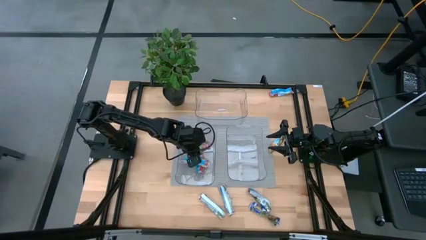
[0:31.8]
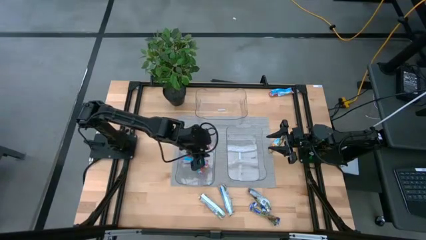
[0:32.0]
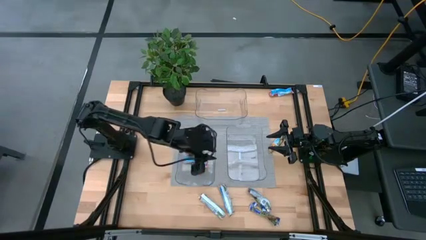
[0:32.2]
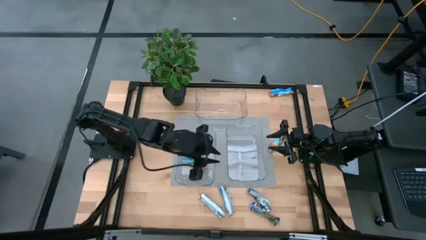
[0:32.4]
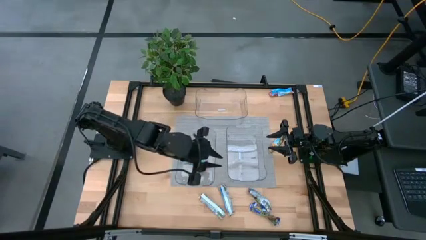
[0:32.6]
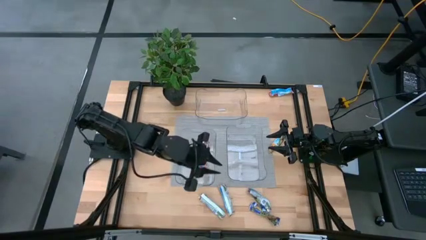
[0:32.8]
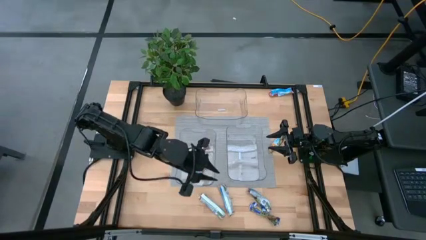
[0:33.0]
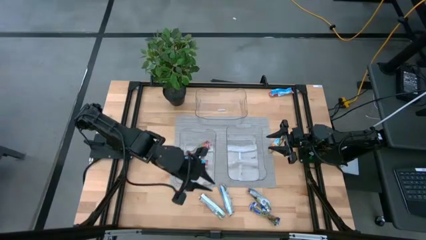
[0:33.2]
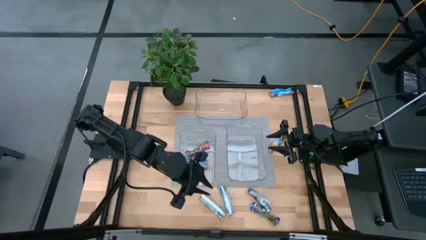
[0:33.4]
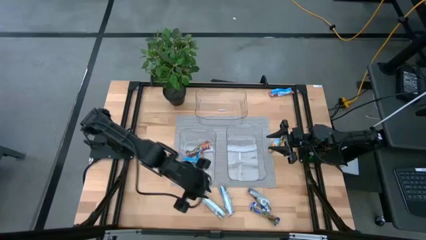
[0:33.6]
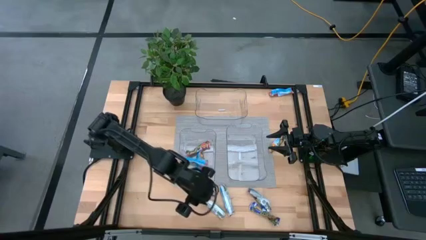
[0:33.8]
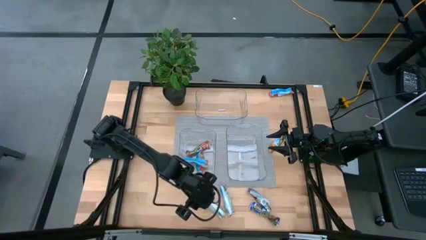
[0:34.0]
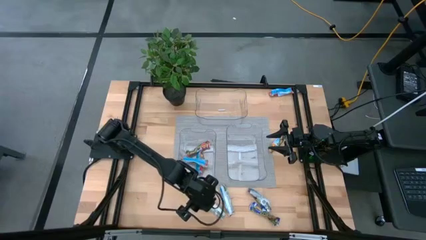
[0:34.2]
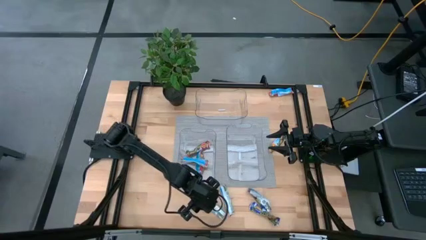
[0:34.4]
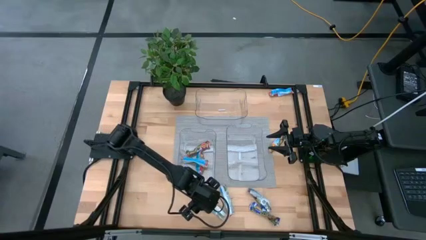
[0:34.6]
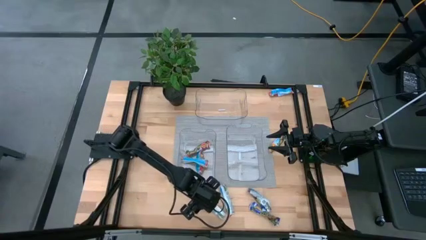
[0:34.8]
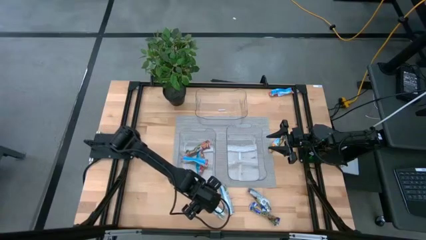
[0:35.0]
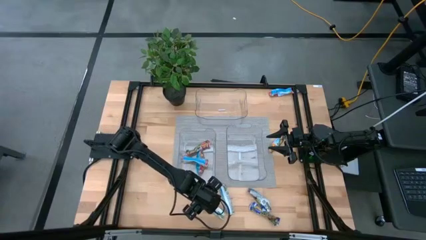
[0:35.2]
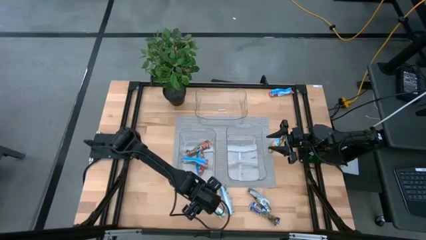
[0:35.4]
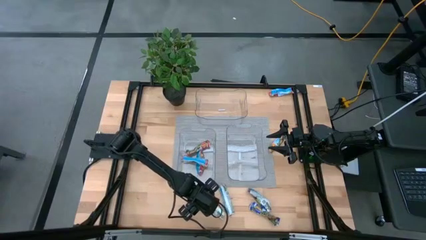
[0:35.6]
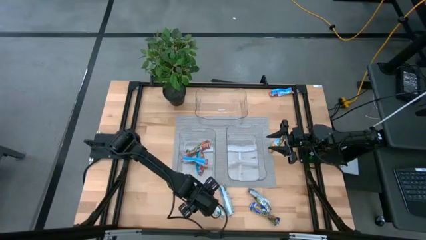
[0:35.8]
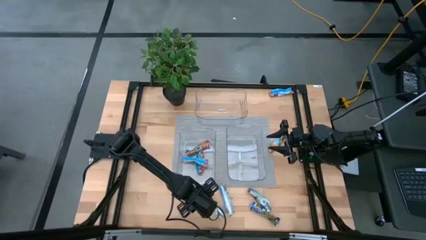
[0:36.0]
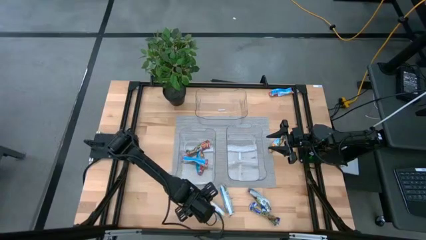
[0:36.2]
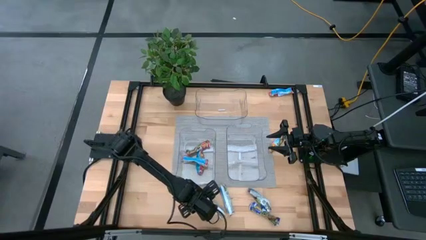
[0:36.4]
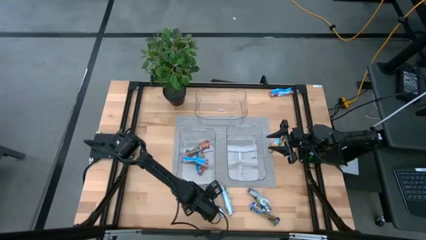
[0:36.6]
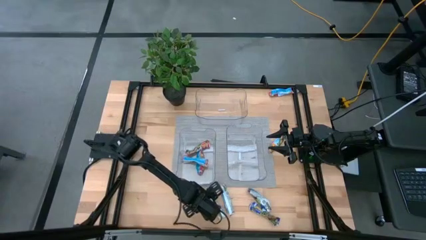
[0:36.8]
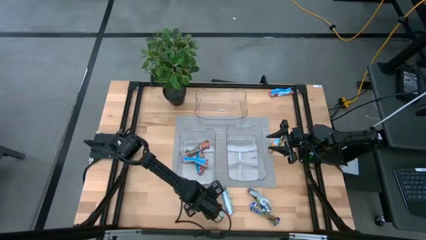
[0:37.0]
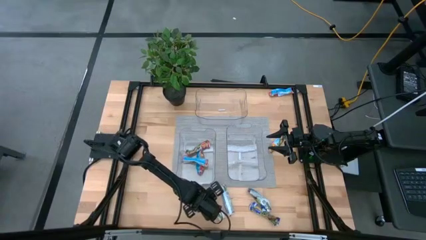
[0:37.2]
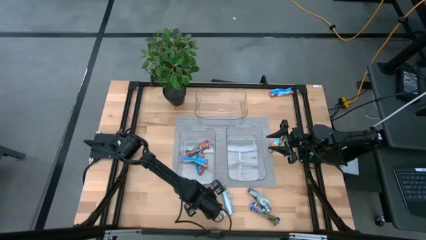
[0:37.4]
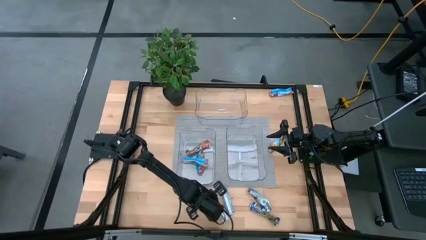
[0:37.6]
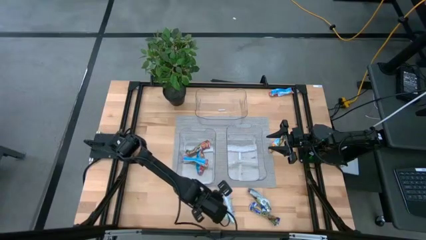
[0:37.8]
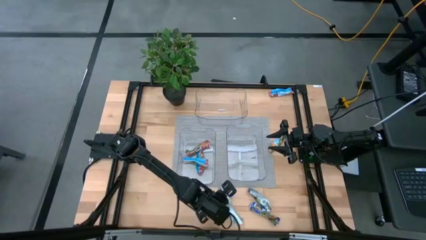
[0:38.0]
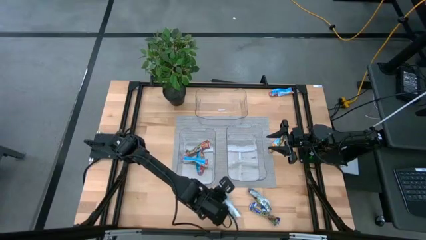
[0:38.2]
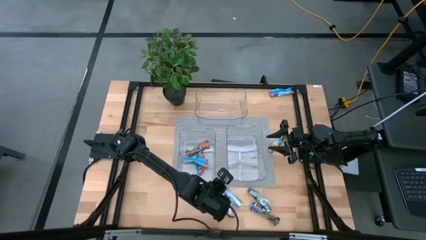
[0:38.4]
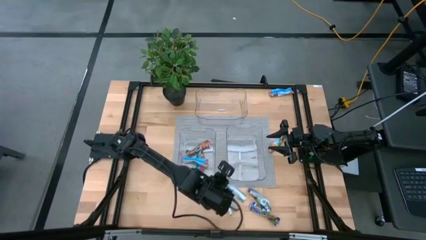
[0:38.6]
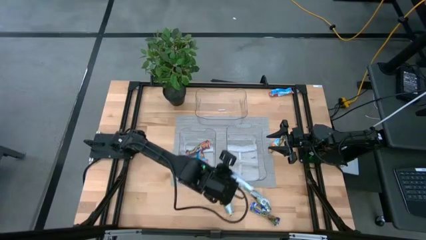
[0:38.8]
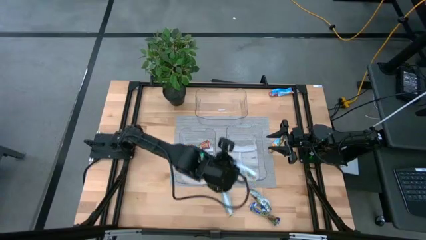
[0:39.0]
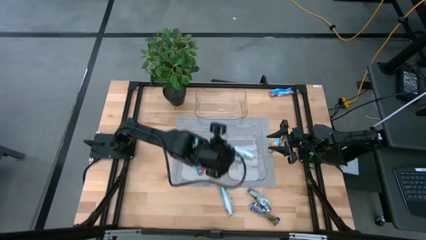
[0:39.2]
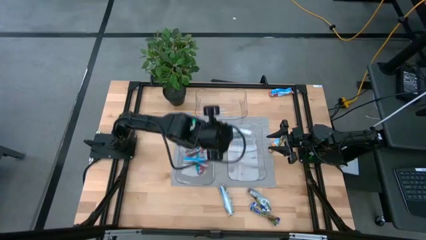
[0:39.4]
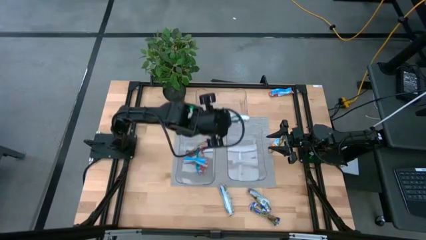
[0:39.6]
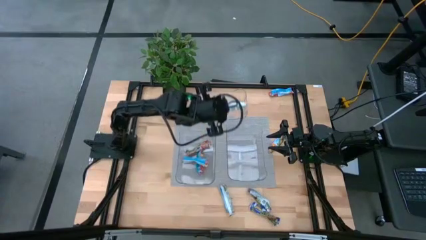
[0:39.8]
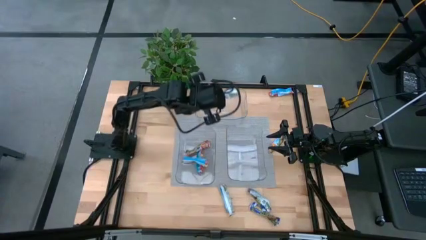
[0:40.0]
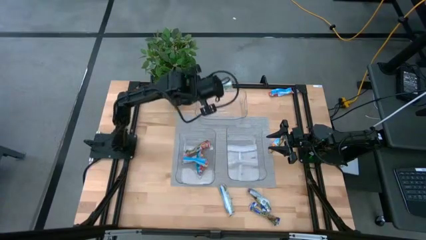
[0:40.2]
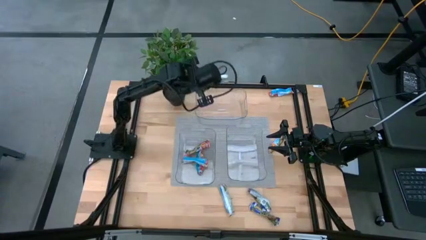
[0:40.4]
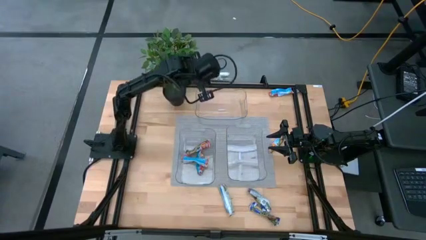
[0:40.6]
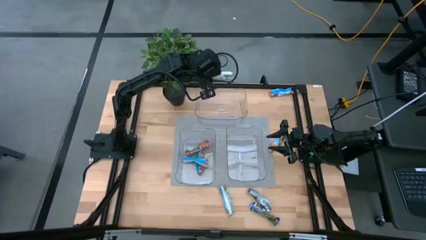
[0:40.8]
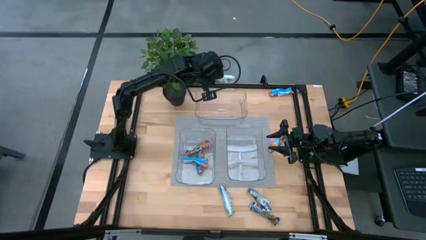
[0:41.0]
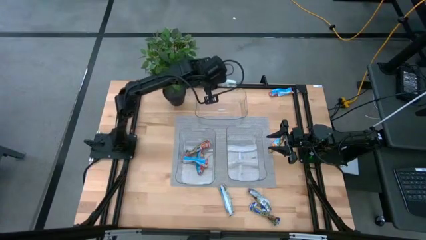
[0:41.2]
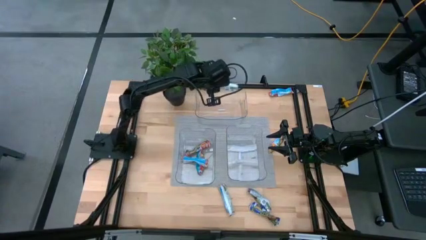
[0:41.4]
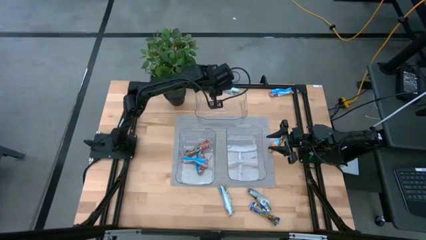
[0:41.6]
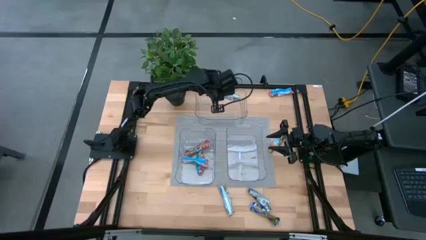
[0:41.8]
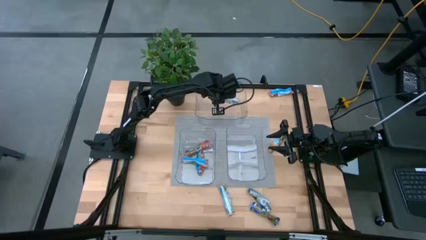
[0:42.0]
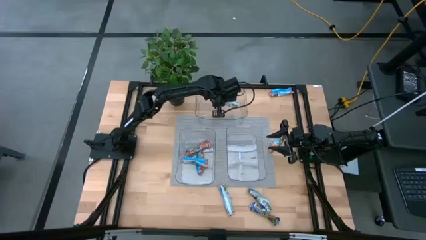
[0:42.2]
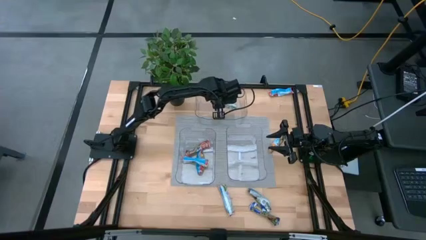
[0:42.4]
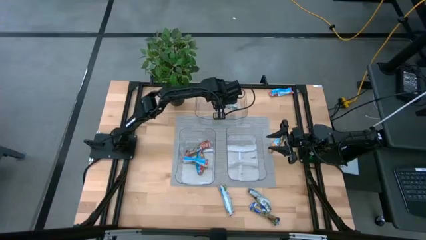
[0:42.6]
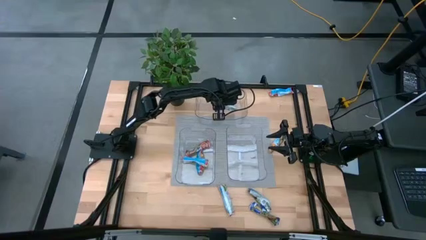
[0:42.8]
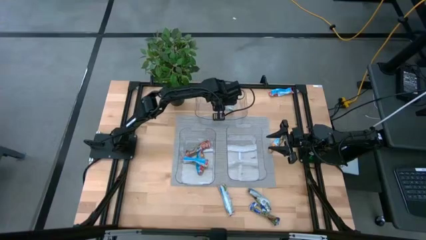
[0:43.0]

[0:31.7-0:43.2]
Task: Pick and place Granola Bars by type
Put the yellow granola bar into the top transparent bin

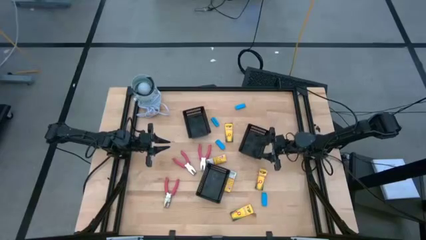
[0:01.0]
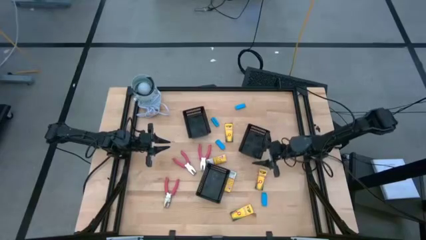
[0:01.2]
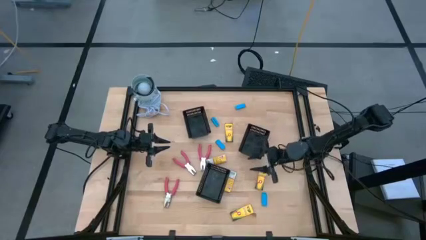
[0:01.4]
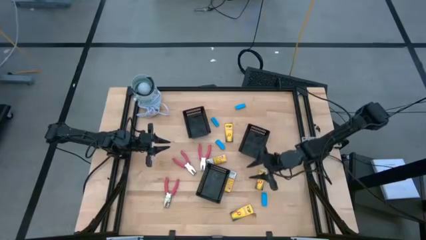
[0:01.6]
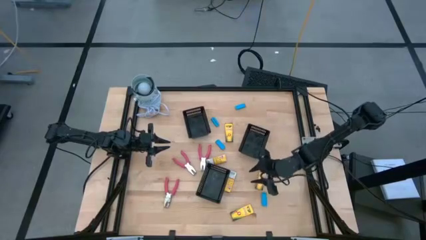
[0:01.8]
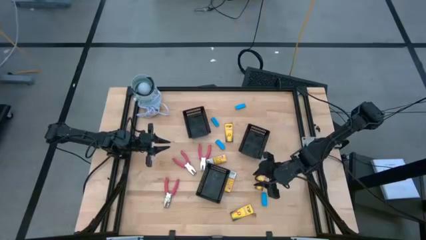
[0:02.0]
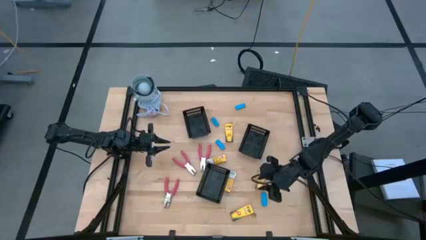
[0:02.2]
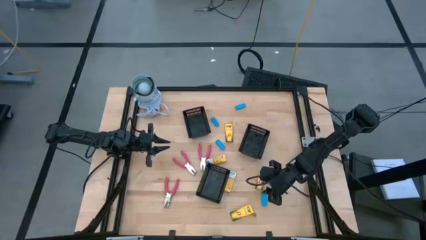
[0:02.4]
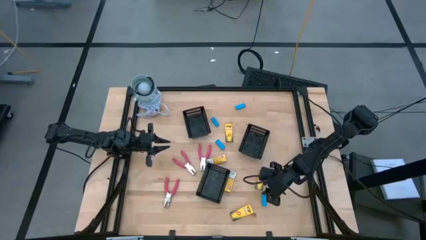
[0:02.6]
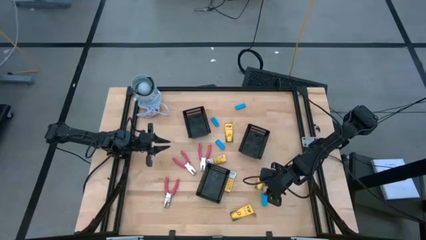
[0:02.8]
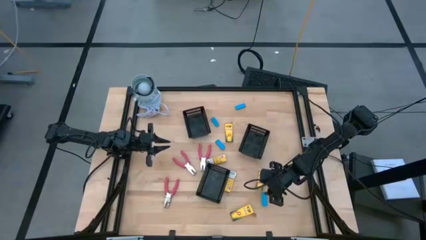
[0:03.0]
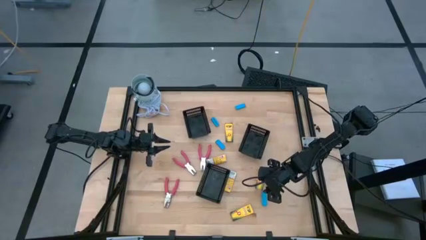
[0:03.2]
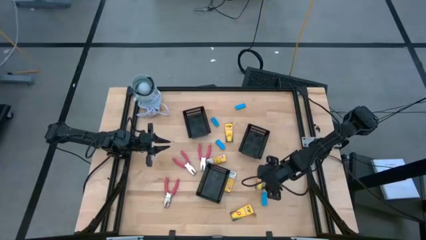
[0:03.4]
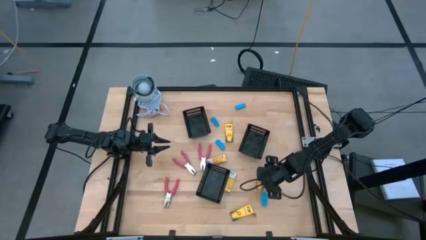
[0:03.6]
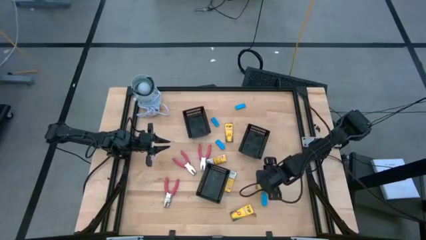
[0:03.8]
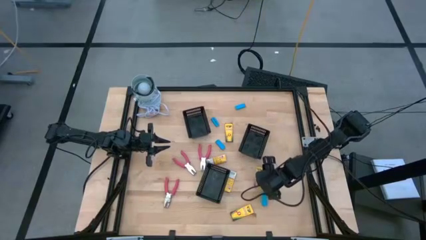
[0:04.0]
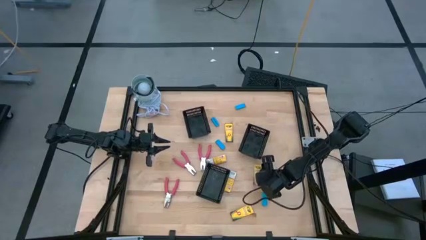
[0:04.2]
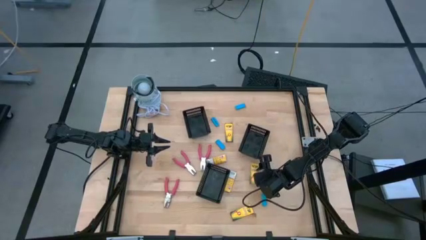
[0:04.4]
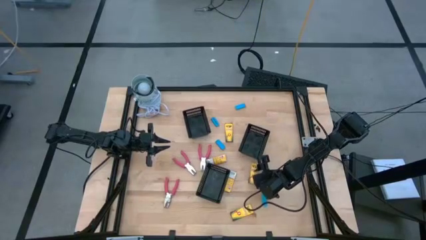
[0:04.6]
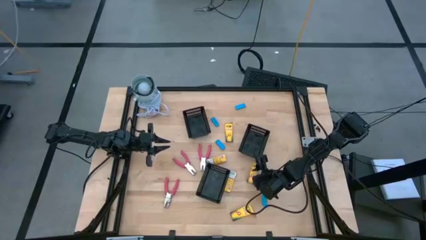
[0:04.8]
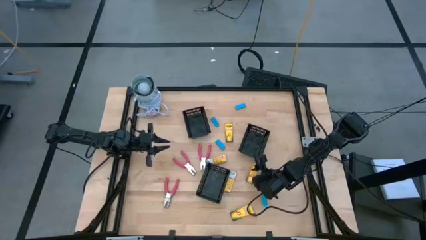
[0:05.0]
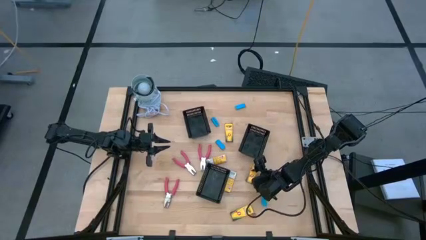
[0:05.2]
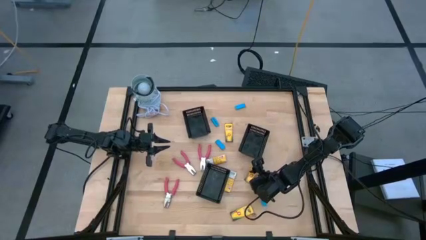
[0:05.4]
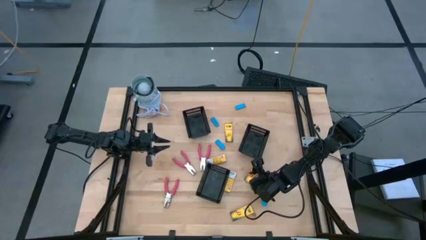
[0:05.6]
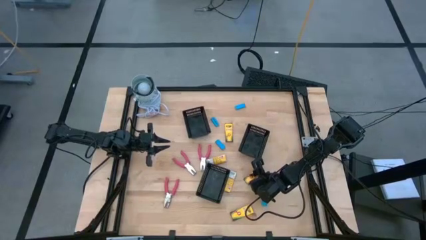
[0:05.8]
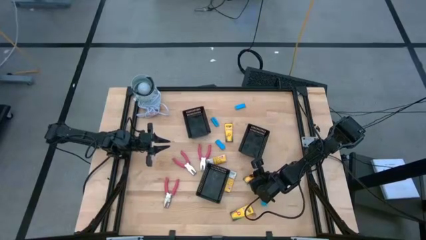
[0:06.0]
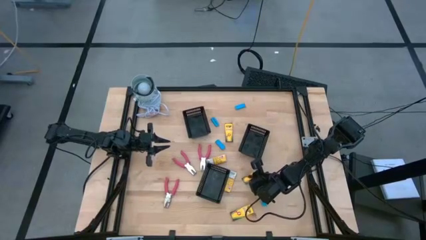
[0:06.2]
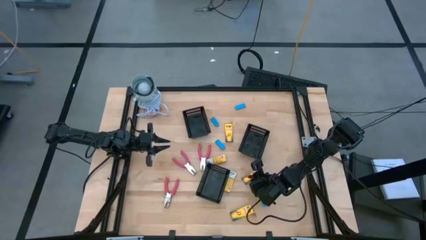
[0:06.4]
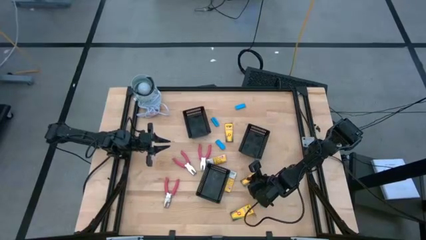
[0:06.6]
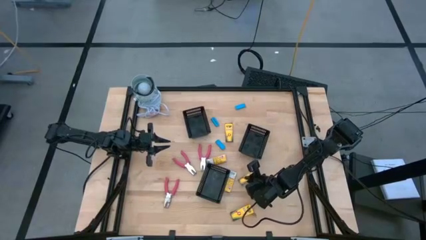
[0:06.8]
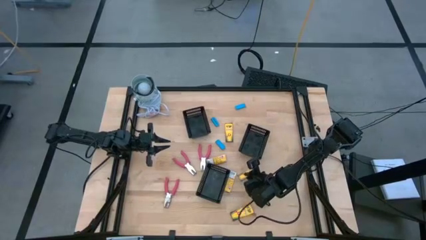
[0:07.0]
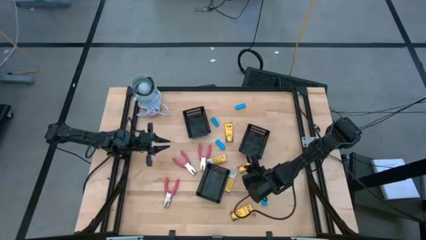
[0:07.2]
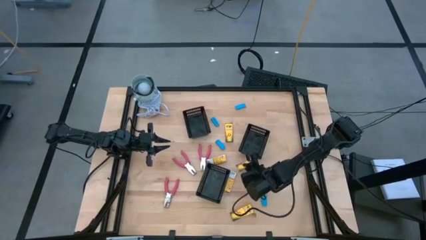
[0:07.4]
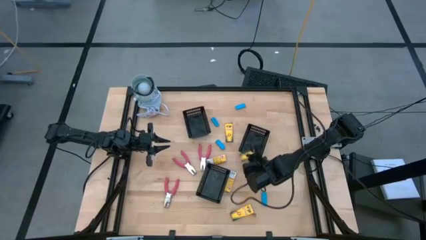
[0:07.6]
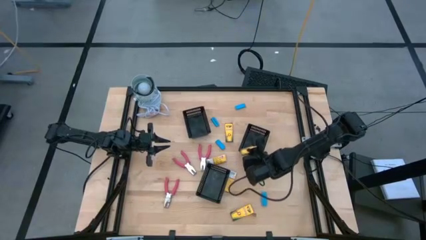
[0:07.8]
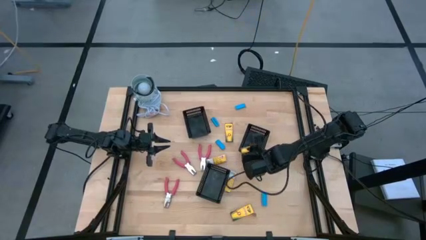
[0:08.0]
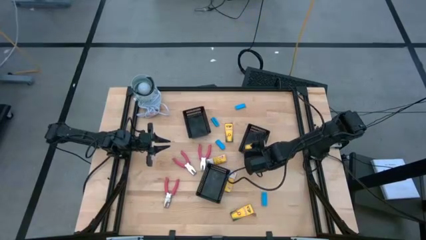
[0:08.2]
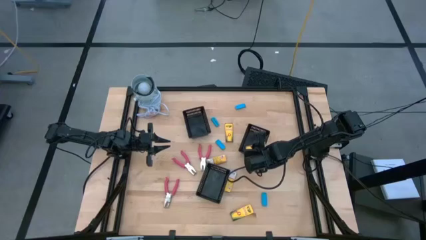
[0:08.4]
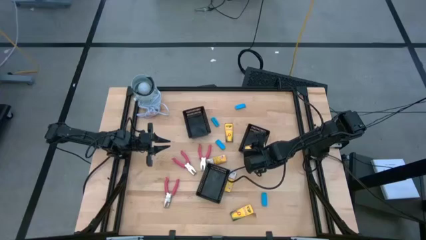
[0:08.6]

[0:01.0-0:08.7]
Task: Pick & Place School Supplies
Put the yellow crayon box into the right black basket
